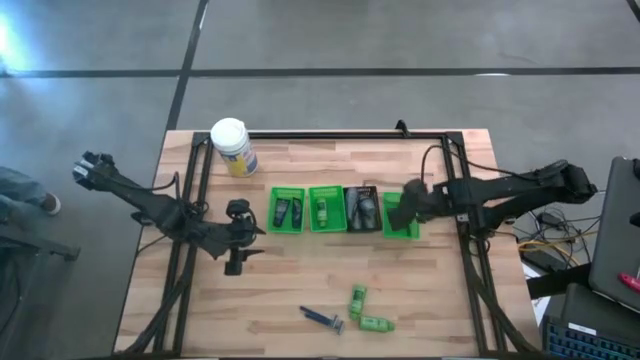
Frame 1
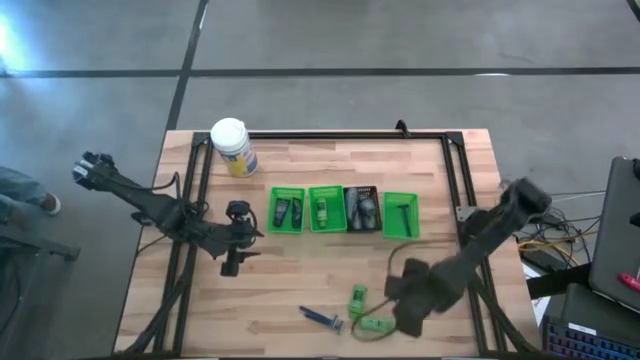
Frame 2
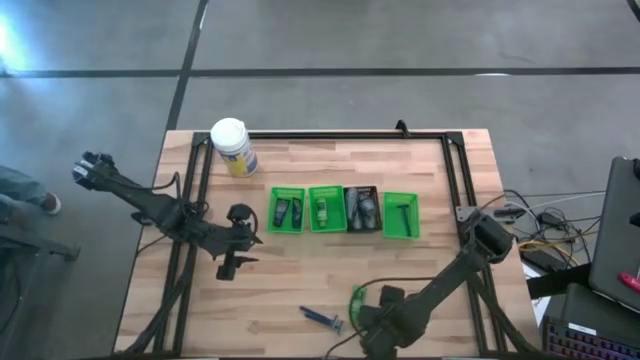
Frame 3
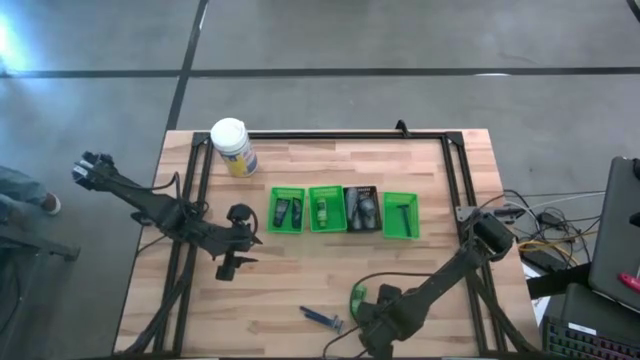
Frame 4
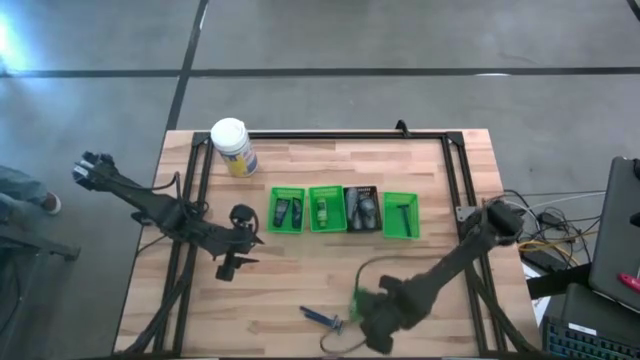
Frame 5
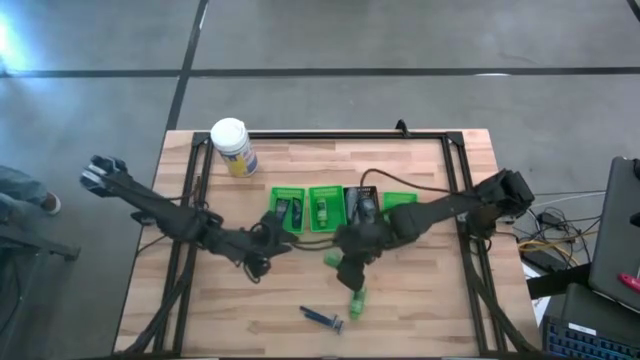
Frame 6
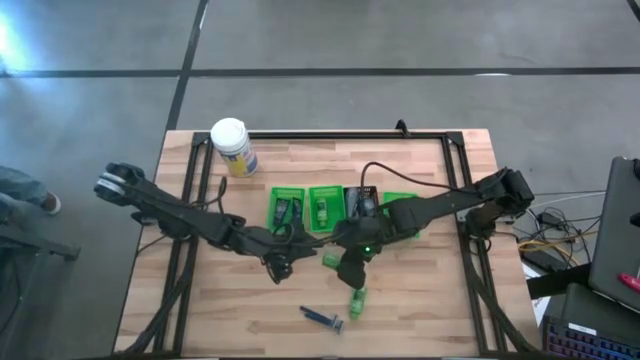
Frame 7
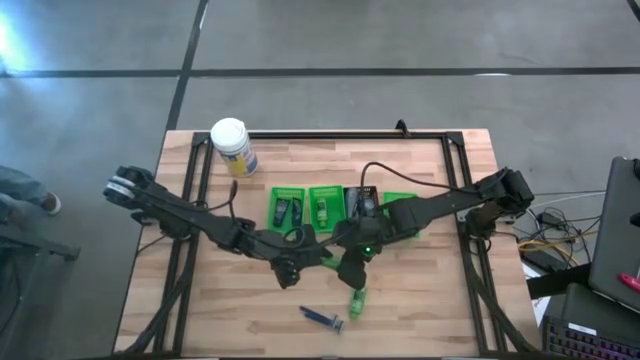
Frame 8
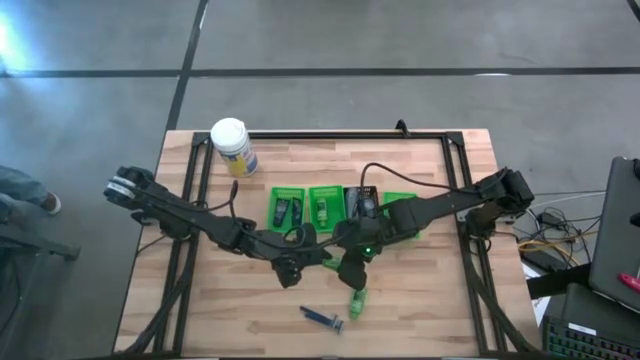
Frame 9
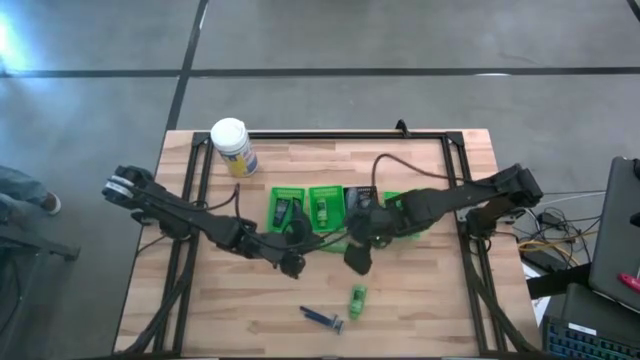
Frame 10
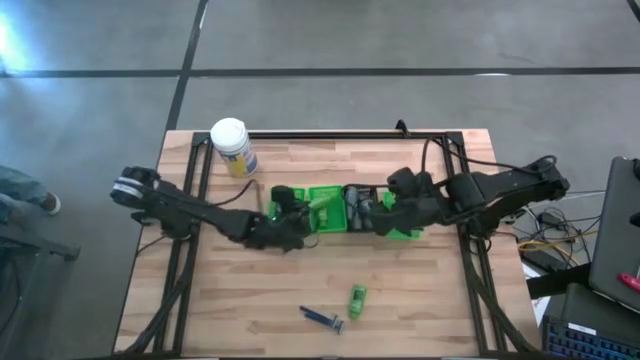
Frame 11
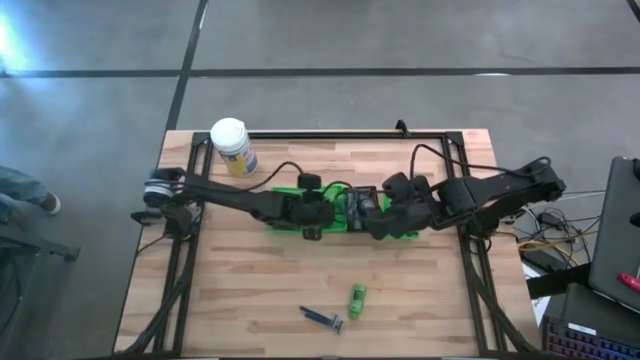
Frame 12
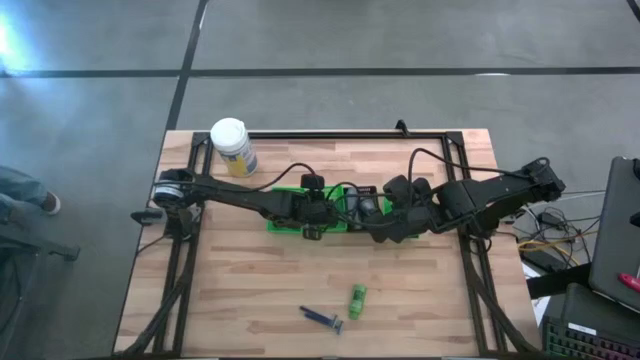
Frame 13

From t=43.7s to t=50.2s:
Task: Pick & Place Travel size toiletries
Put the green shampoo into the middle green bin

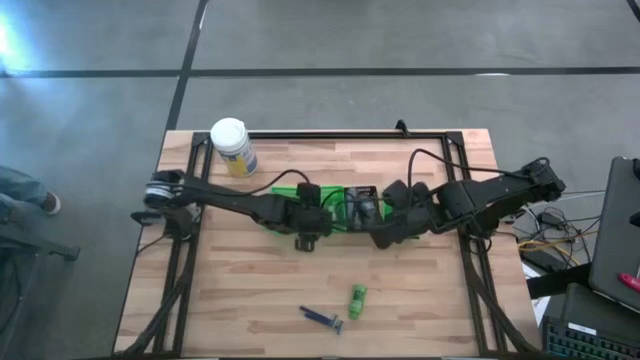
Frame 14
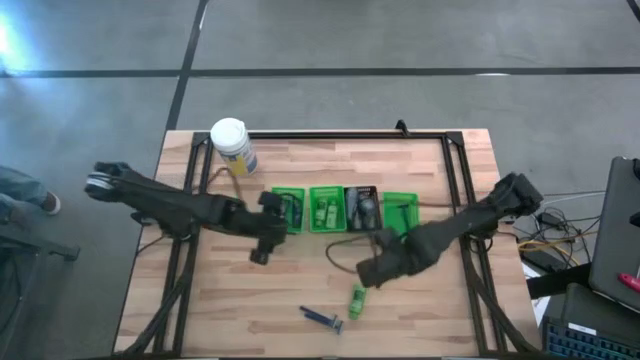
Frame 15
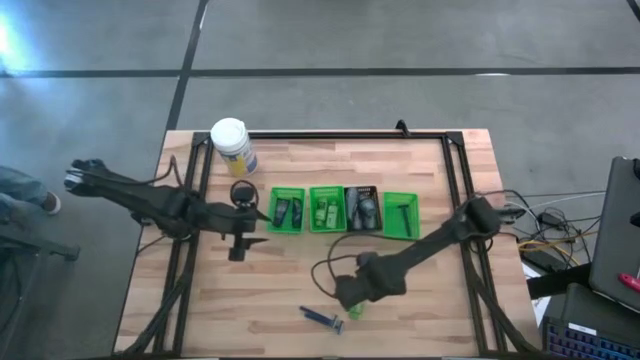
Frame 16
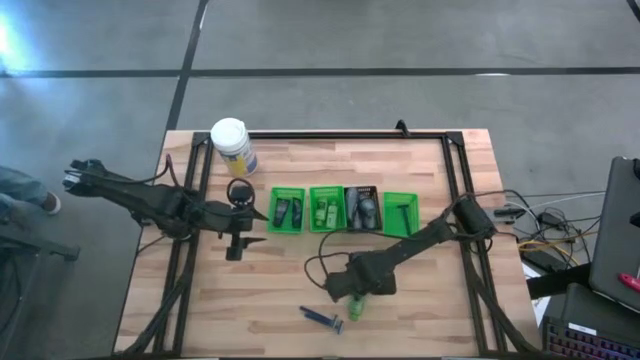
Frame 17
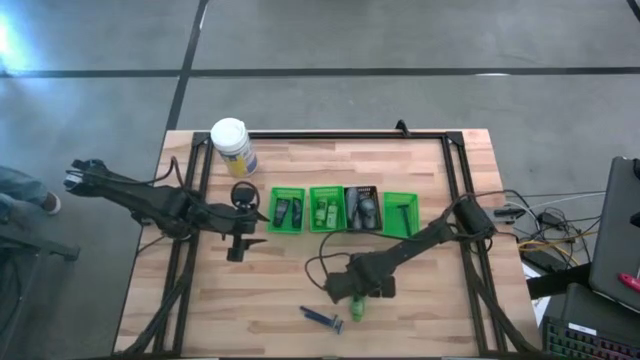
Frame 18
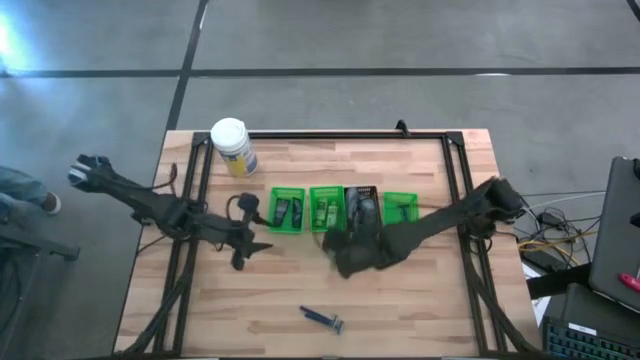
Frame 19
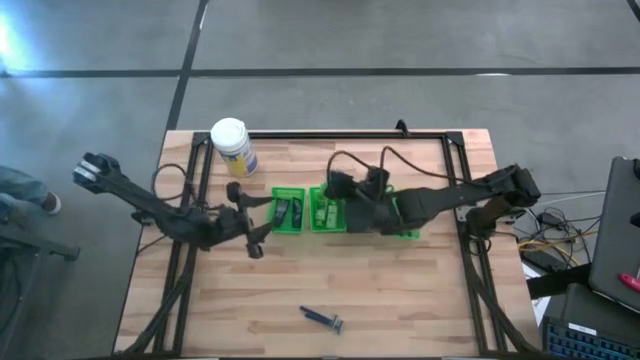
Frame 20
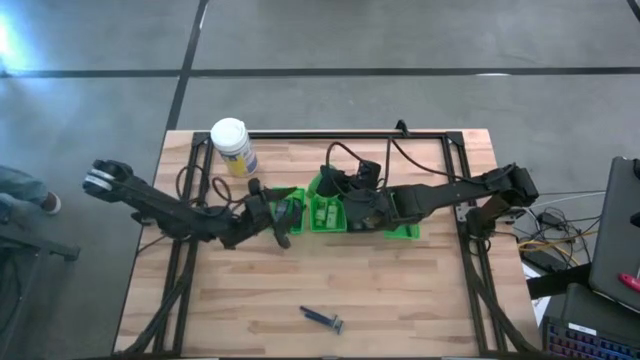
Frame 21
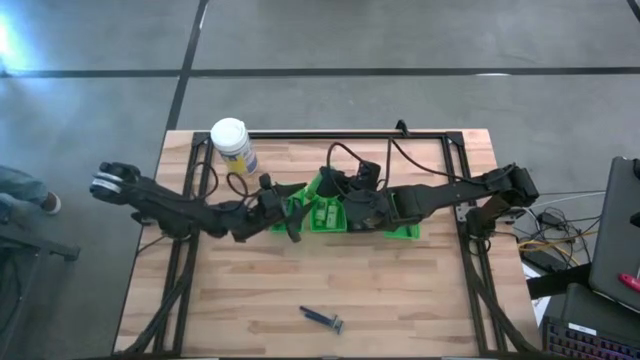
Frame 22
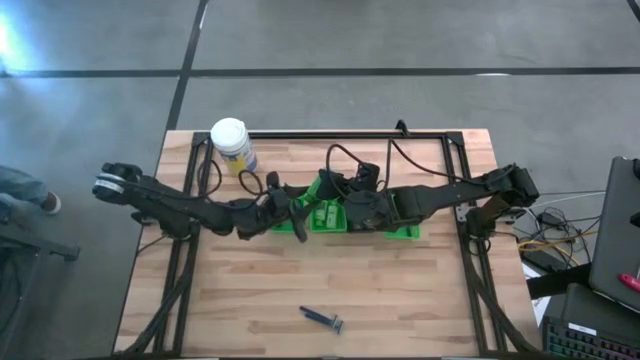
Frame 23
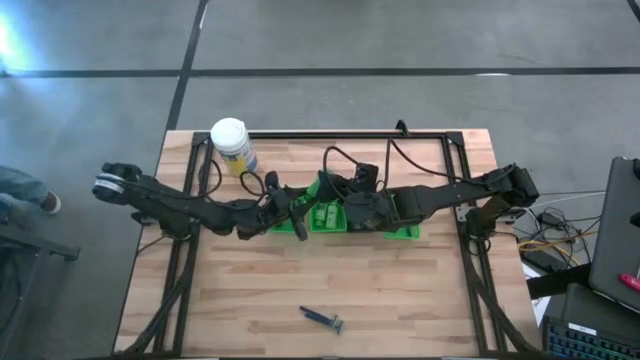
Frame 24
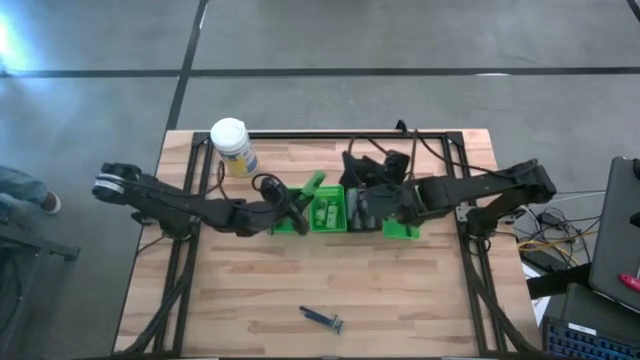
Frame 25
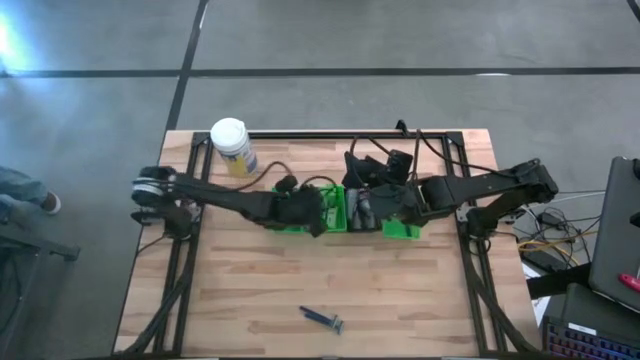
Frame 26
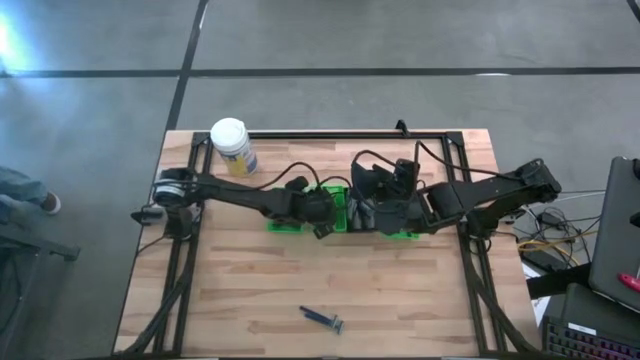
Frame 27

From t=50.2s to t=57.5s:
Put the green shampoo into the middle green bin

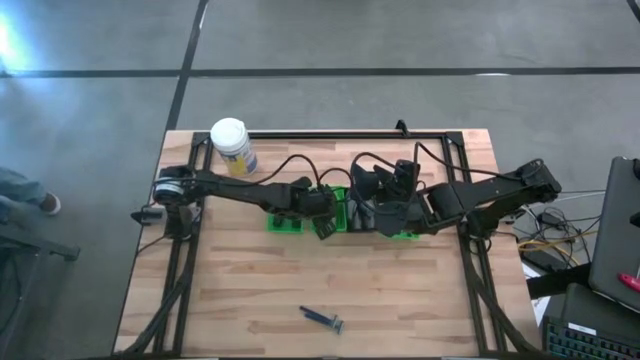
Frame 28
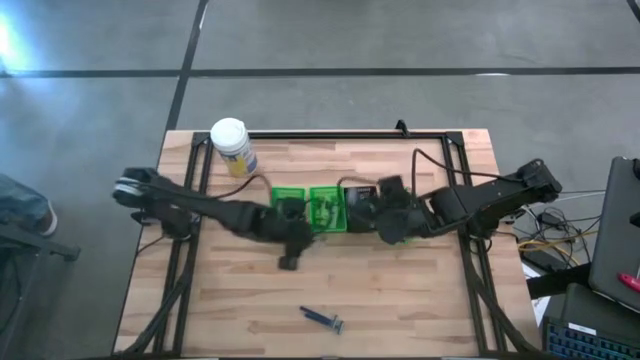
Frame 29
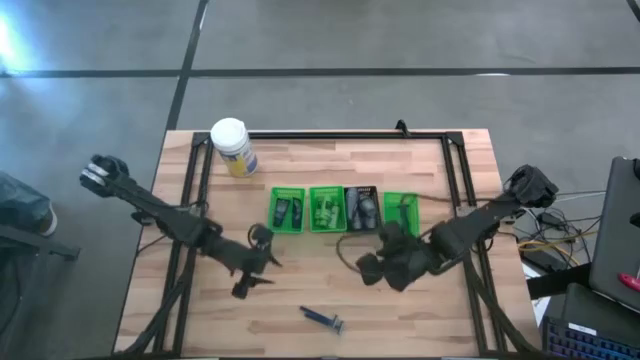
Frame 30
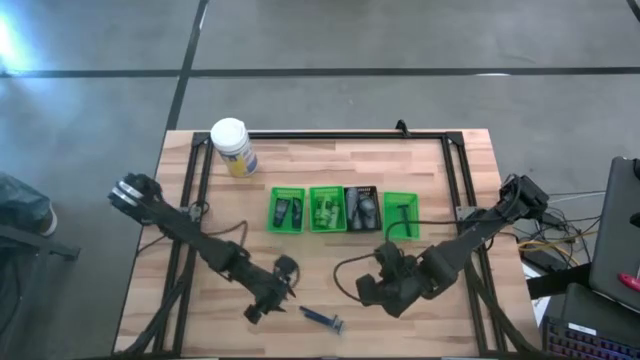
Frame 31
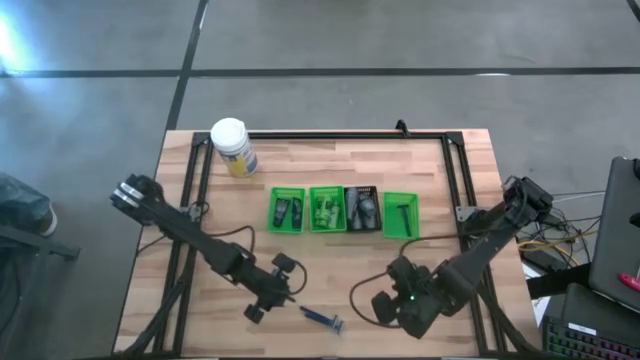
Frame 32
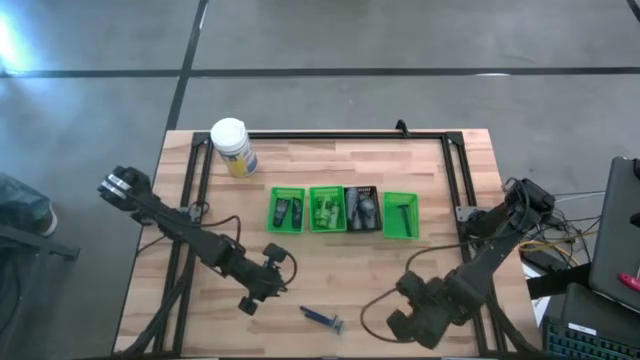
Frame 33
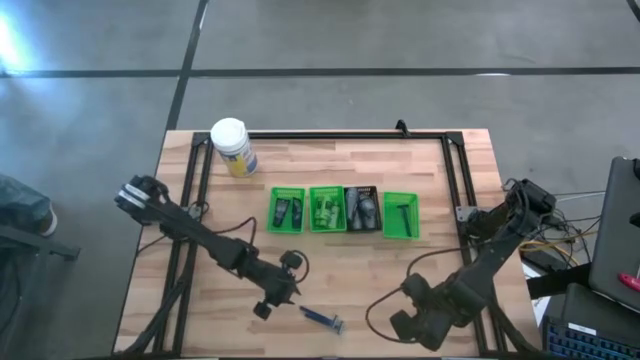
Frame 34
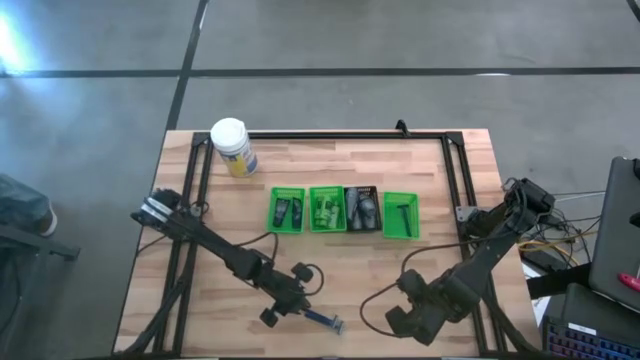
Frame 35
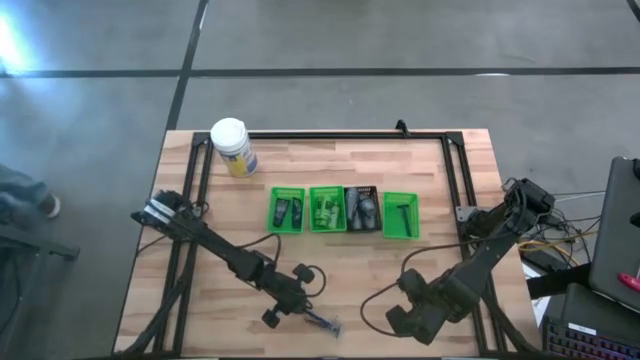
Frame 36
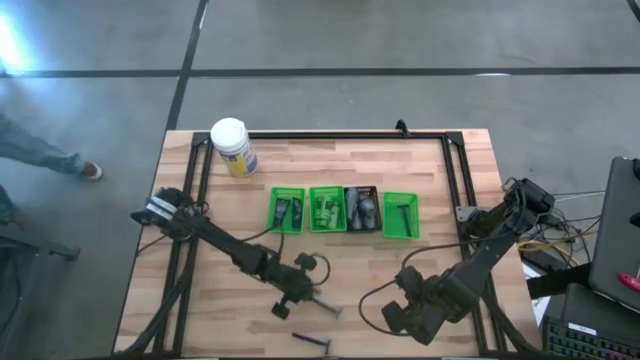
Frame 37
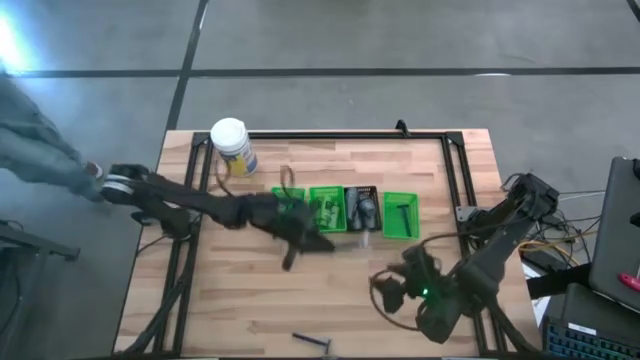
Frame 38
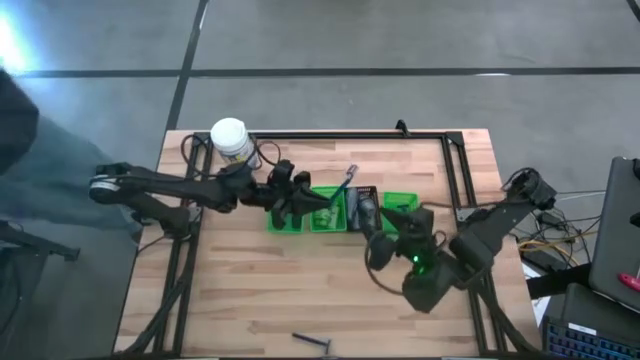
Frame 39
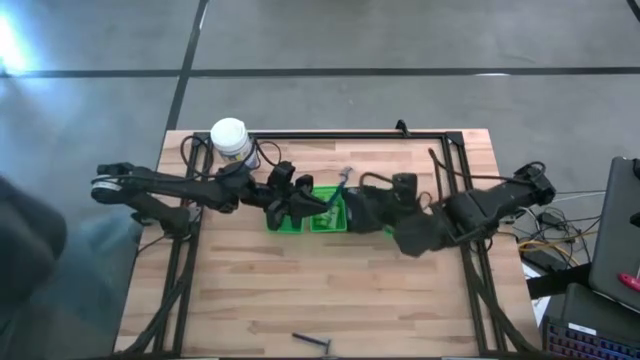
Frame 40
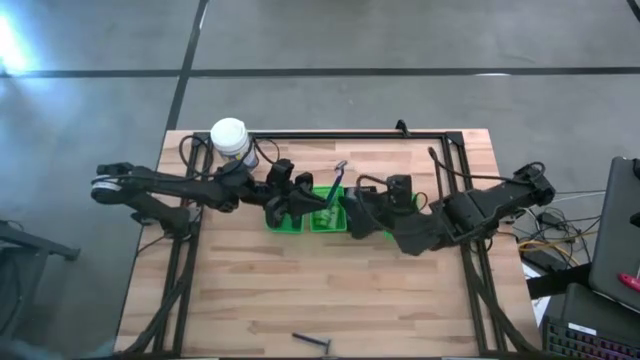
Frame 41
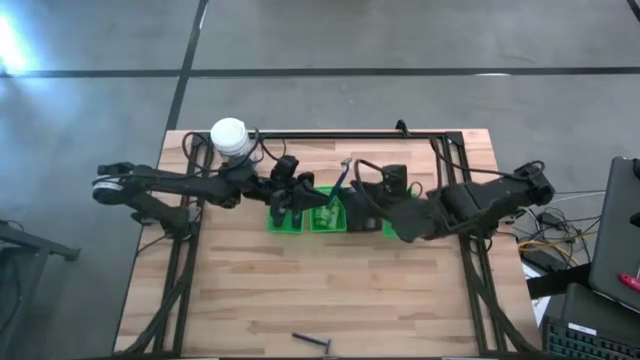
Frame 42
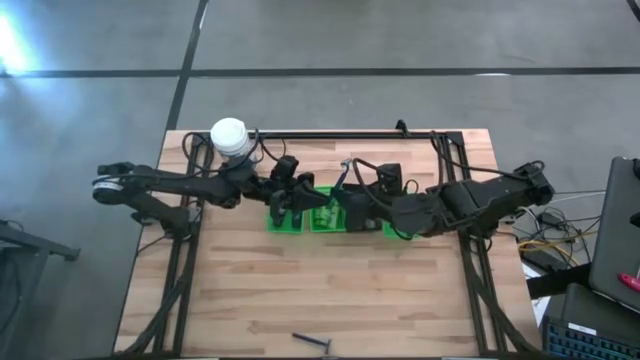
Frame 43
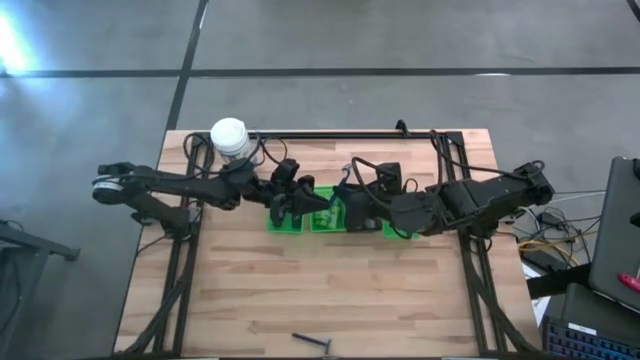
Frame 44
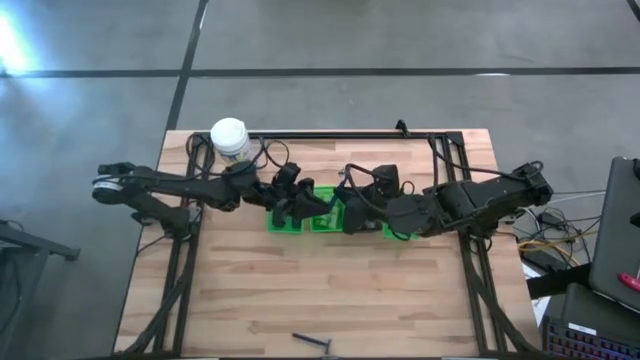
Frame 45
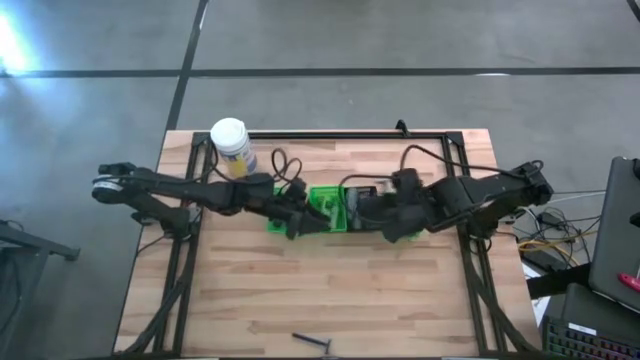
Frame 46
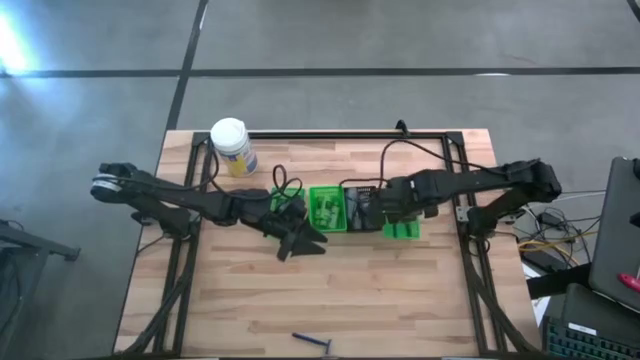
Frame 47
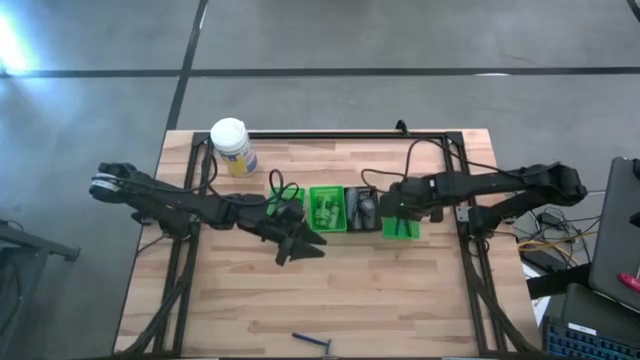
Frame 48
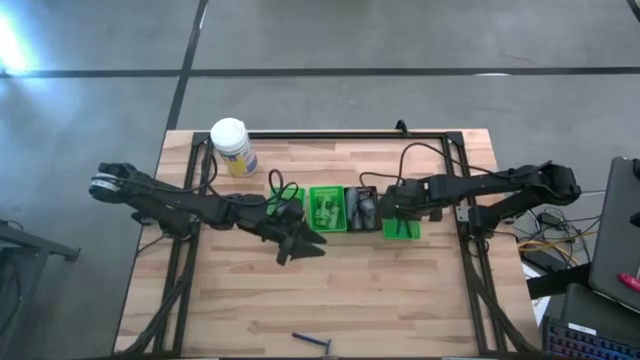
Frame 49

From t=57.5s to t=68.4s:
Put the razor into the right green bin
